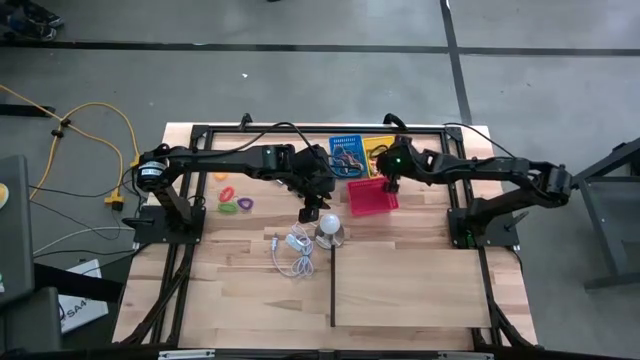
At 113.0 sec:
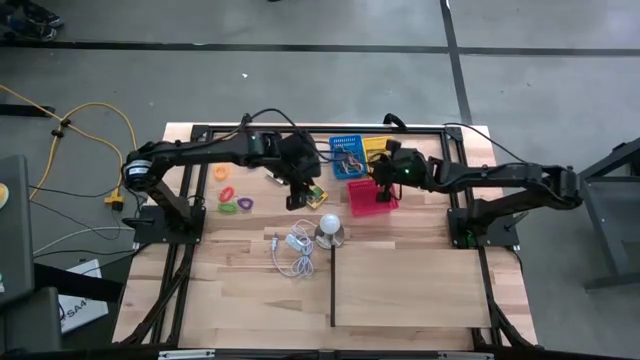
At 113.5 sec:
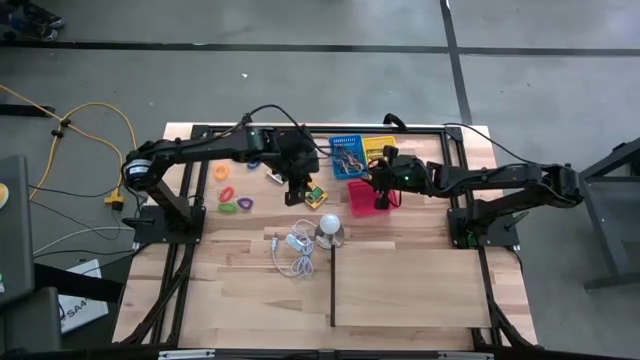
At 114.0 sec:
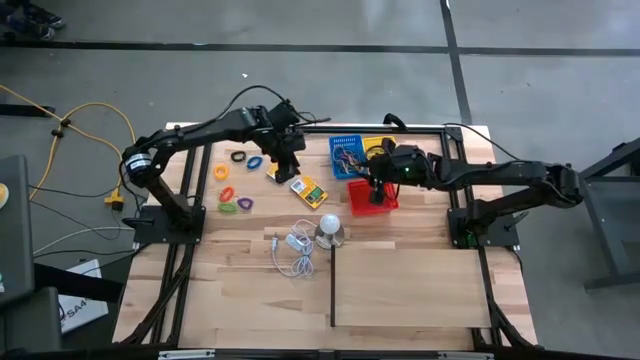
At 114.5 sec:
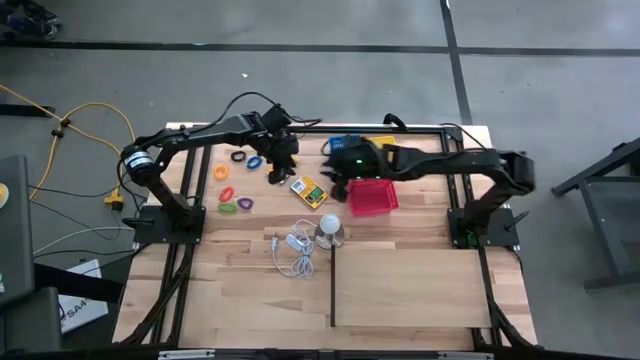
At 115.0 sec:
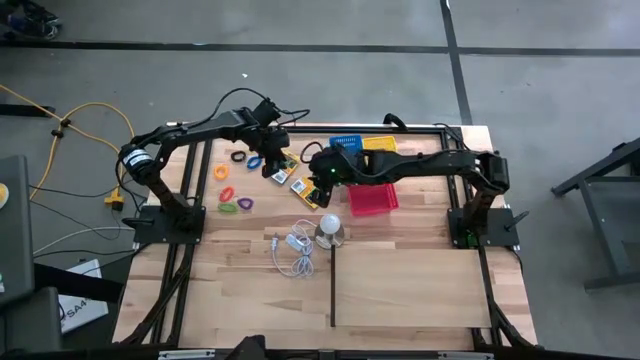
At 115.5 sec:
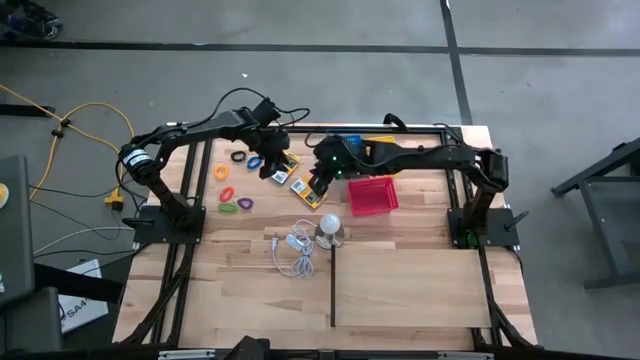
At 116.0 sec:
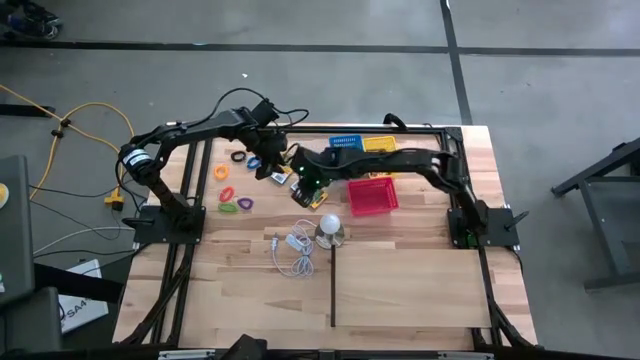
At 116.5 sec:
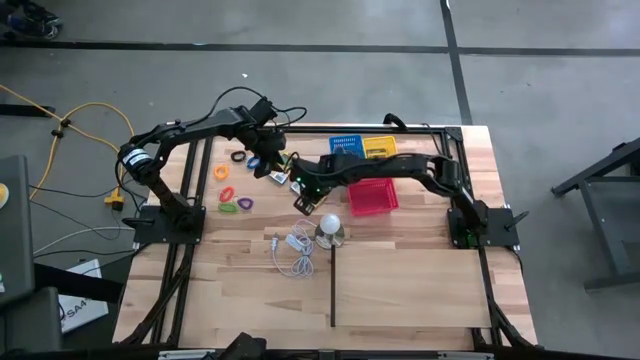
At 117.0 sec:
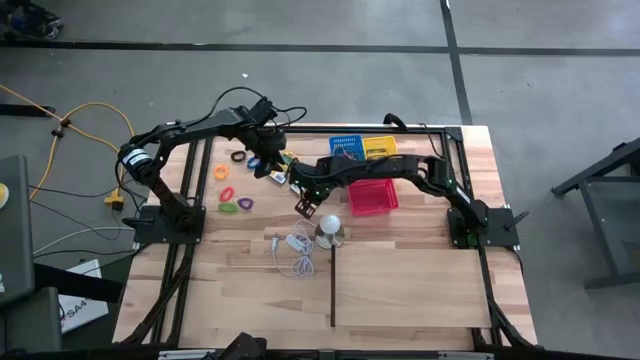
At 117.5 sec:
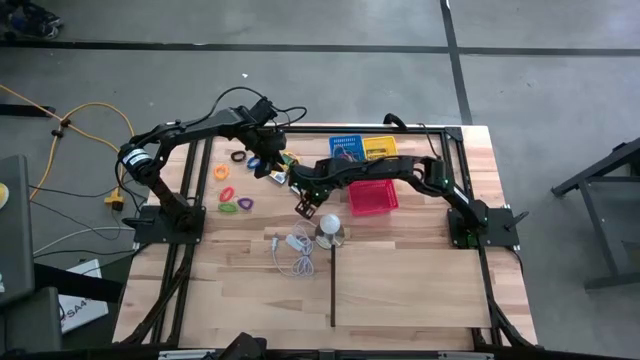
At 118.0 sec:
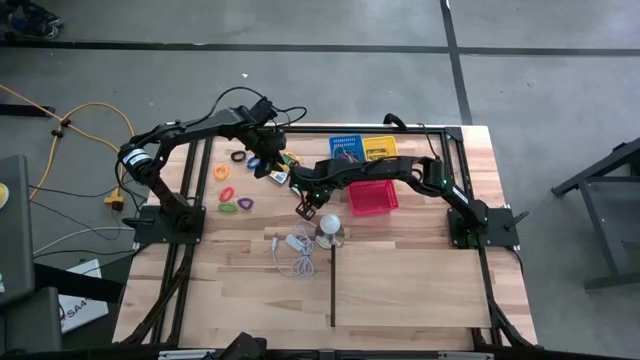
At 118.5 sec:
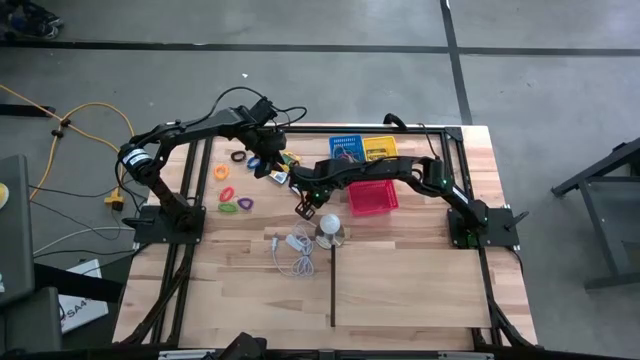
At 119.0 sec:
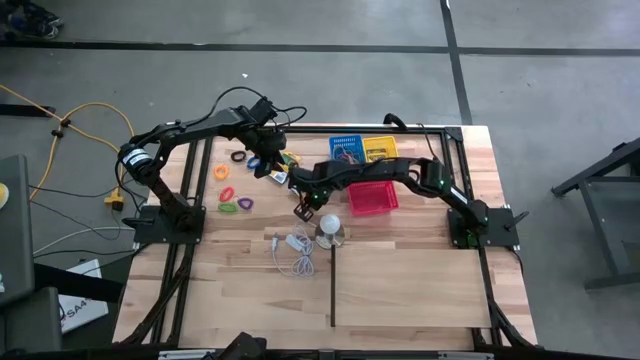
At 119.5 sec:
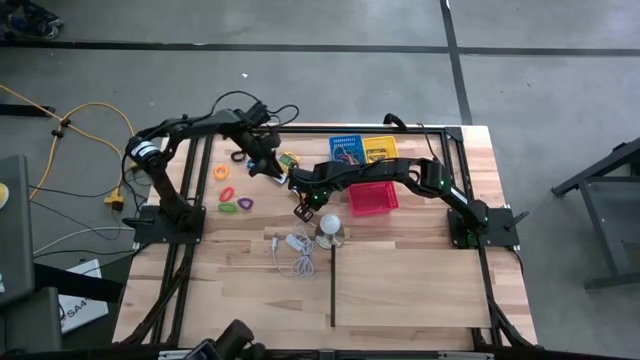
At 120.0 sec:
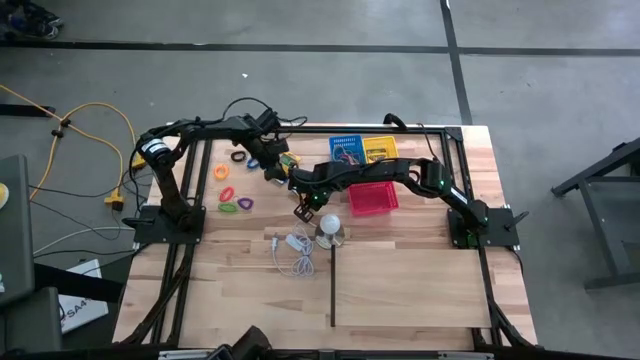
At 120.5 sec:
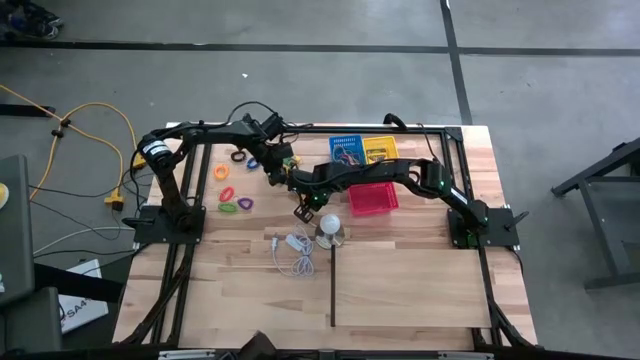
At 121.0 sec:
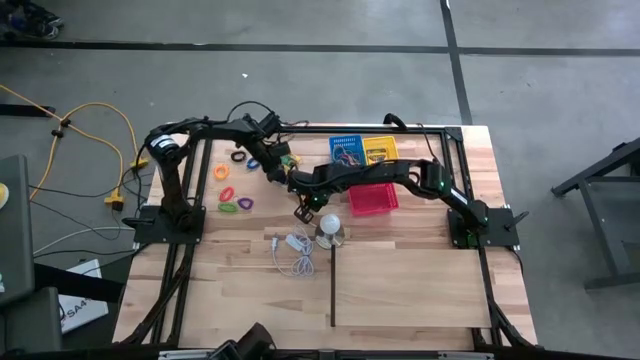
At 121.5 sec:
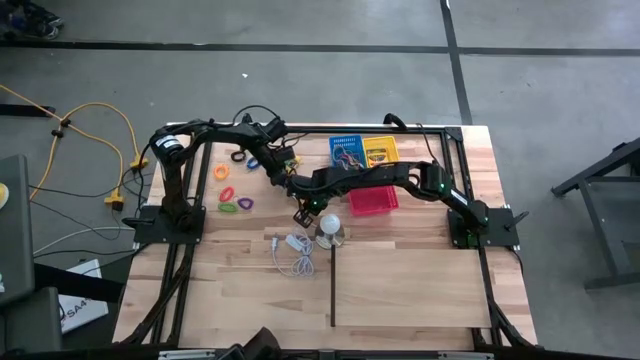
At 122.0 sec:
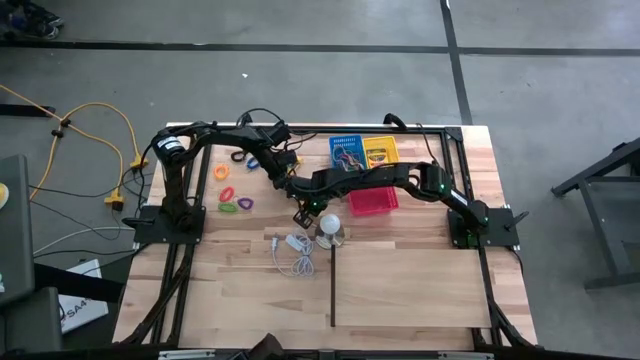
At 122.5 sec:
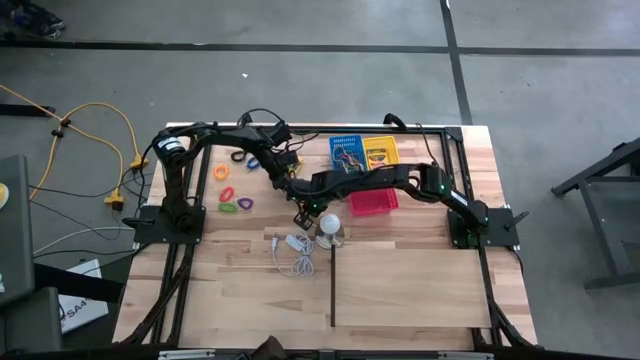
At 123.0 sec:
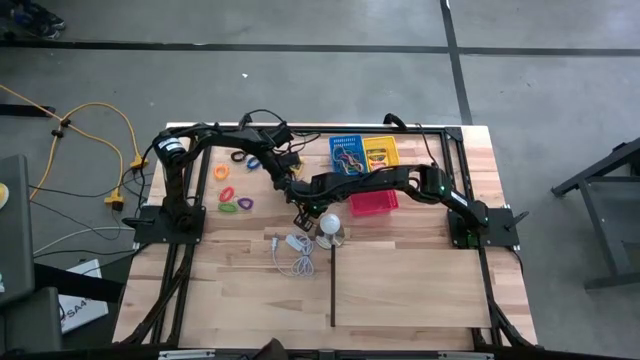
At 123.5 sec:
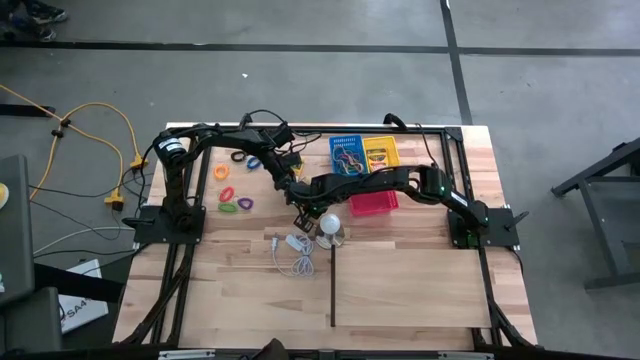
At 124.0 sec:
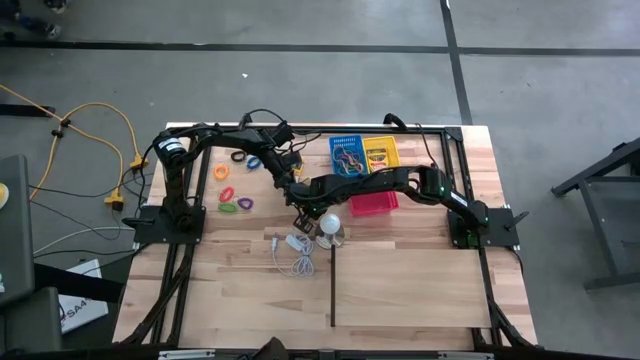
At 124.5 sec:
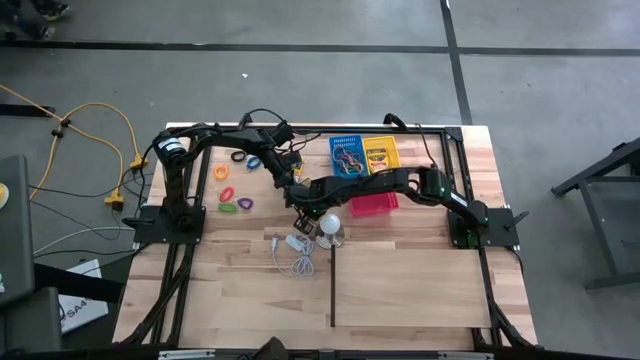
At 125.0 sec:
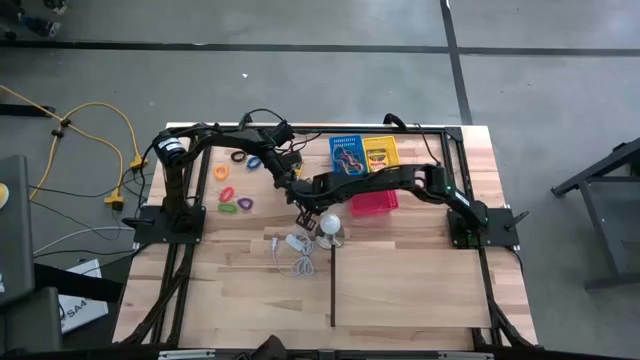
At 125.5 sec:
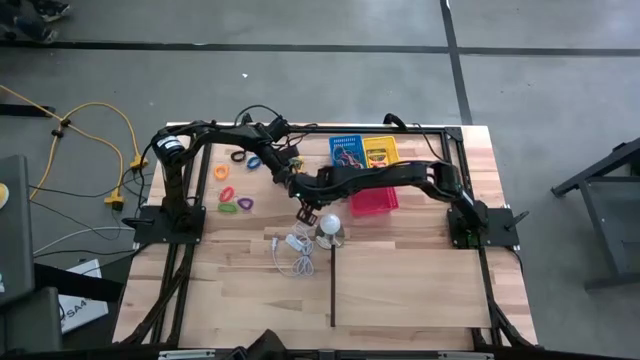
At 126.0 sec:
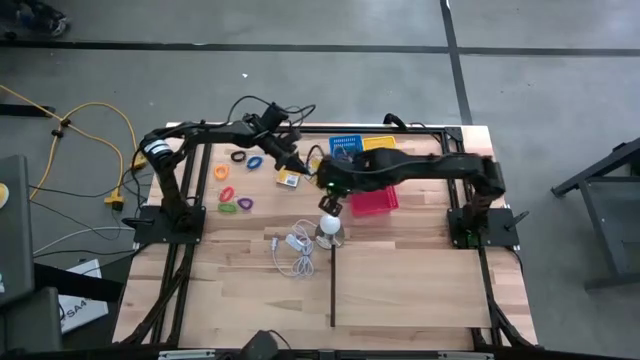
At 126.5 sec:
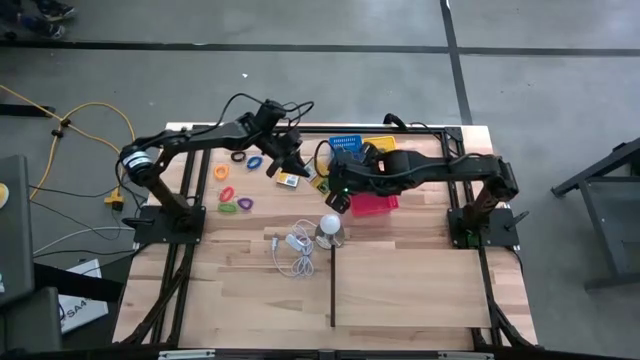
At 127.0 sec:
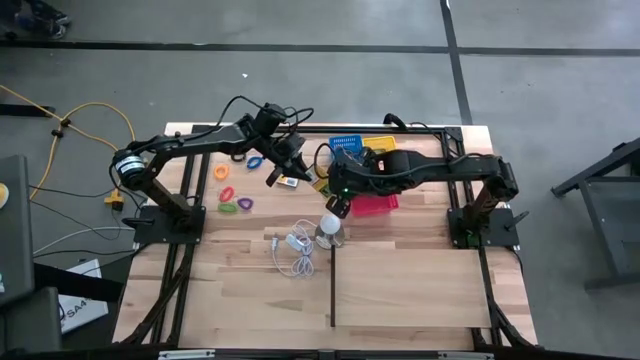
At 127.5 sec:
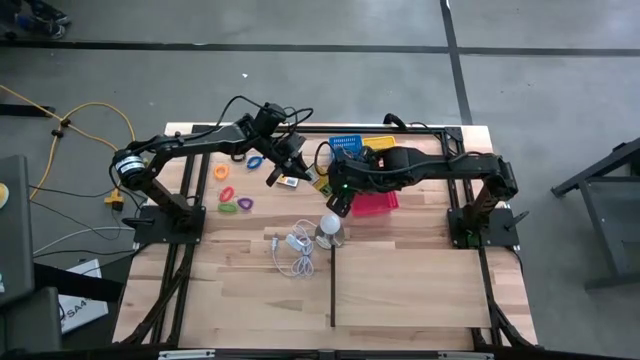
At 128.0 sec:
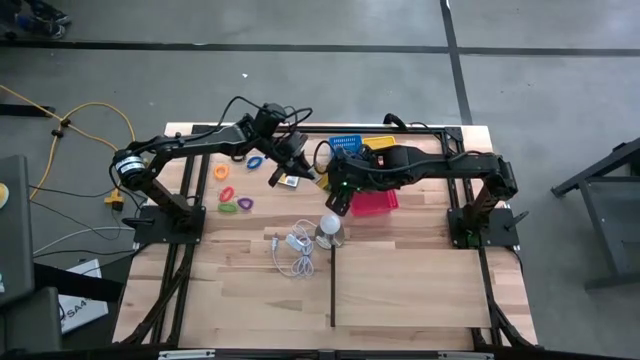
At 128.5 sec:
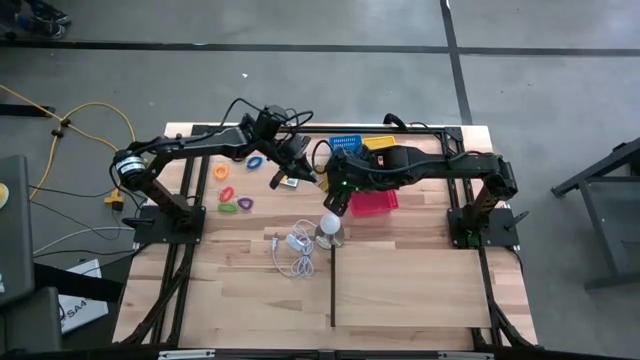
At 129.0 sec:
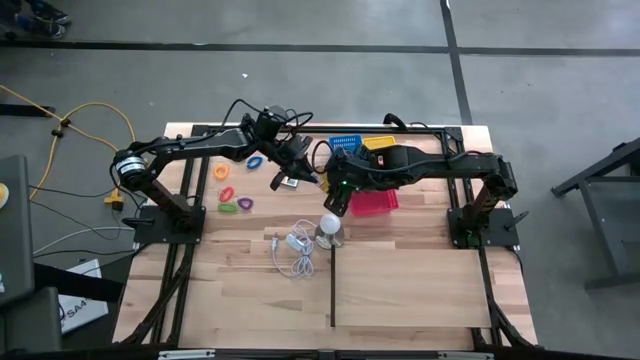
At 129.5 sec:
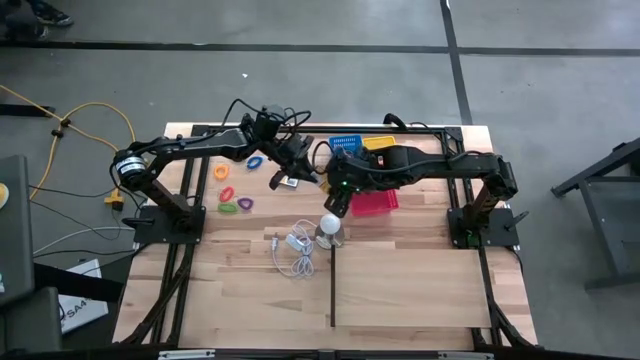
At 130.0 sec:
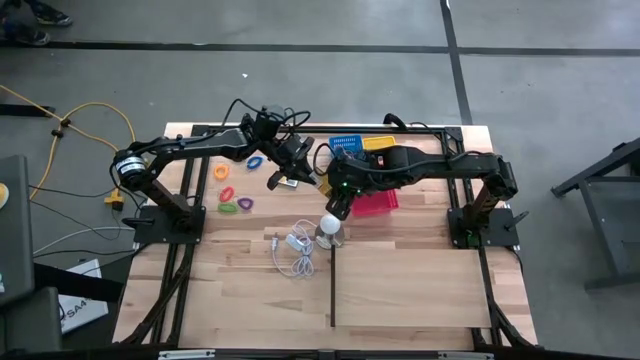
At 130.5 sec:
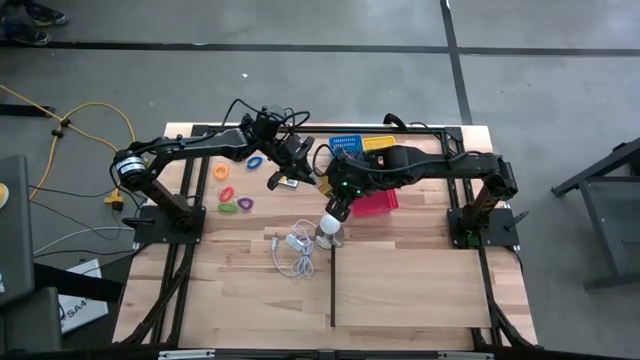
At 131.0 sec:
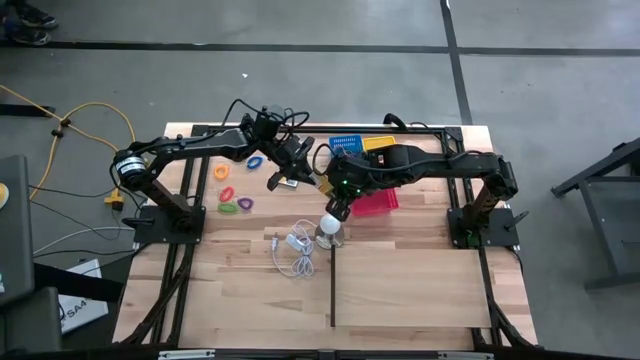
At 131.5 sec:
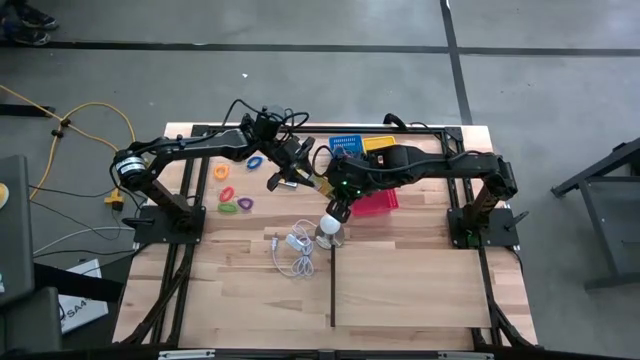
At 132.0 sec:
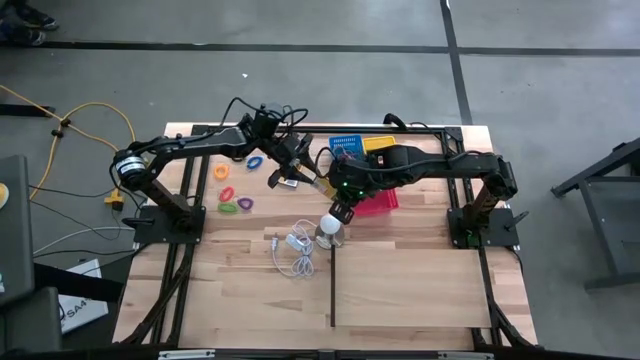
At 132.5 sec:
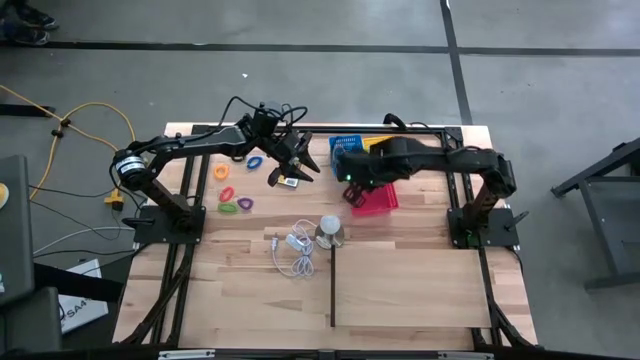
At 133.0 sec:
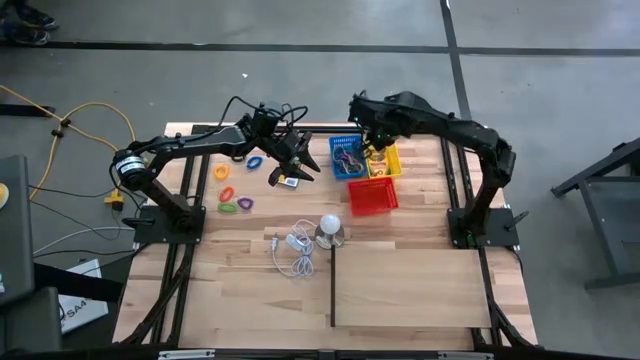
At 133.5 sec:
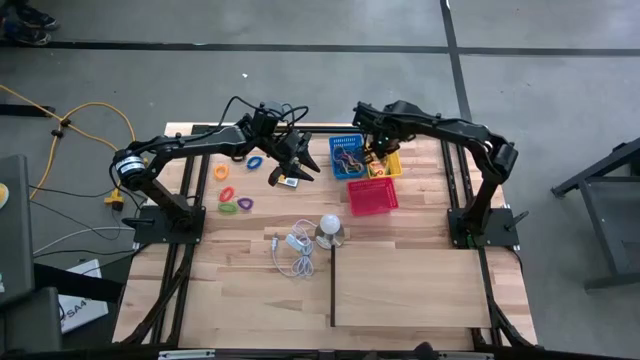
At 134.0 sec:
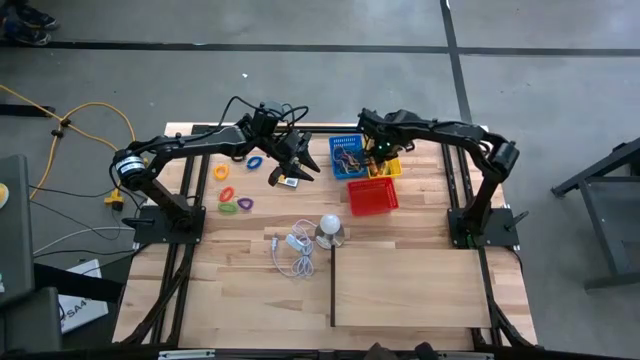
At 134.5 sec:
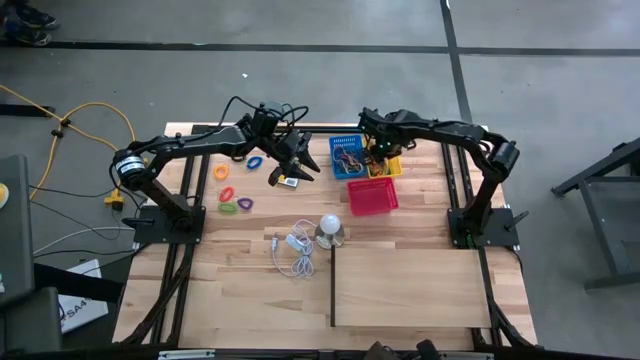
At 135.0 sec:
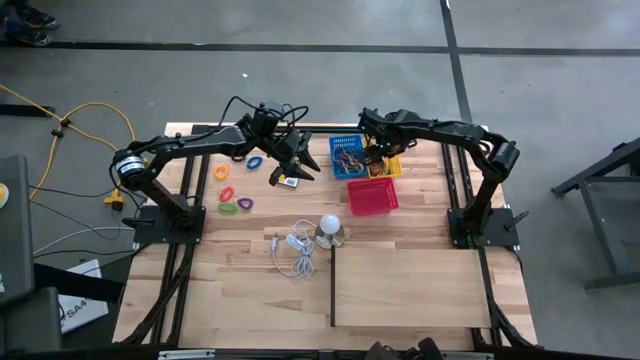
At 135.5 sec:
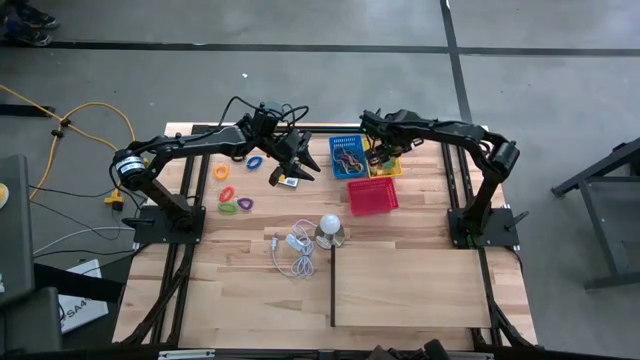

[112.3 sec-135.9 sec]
Task: Pick & Place Office Desk Supplies
Stack the right yellow crayon box on top of the yellow crayon box
